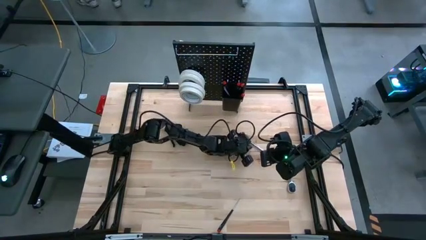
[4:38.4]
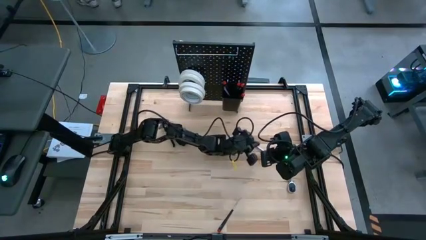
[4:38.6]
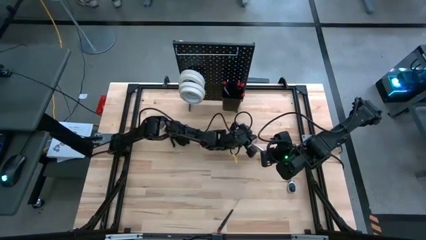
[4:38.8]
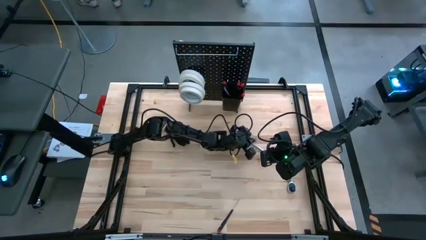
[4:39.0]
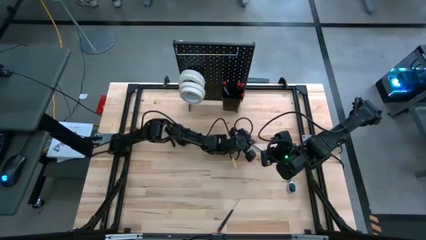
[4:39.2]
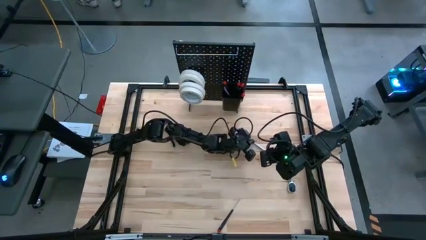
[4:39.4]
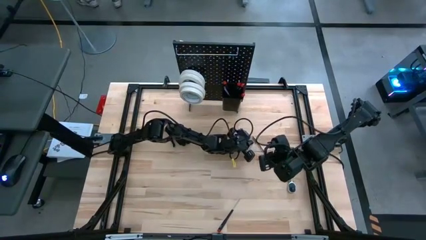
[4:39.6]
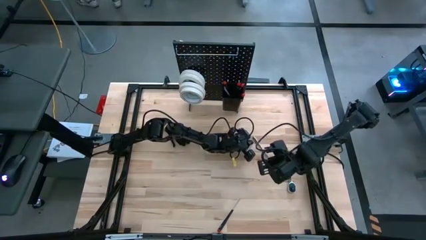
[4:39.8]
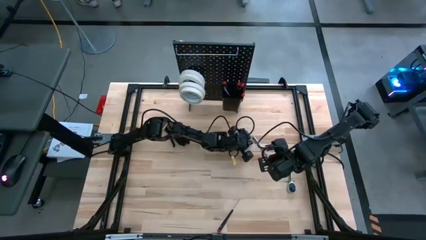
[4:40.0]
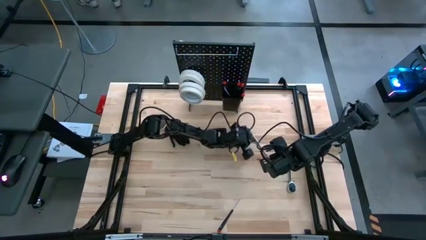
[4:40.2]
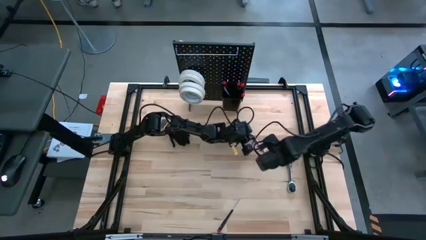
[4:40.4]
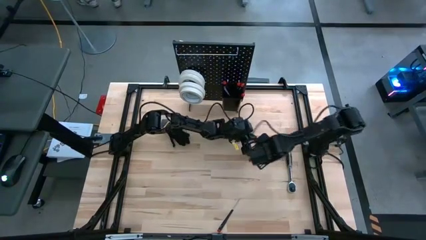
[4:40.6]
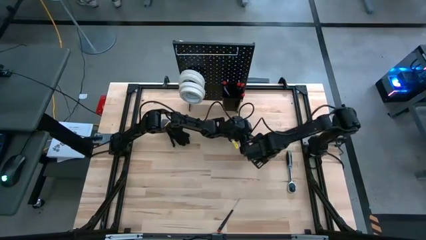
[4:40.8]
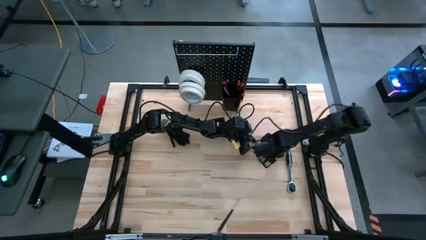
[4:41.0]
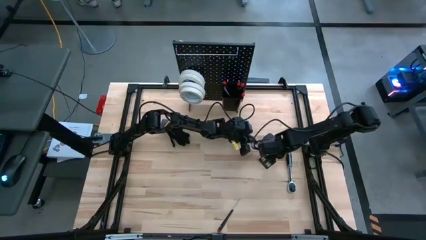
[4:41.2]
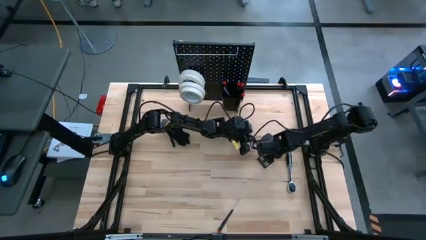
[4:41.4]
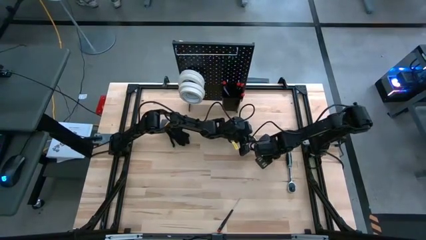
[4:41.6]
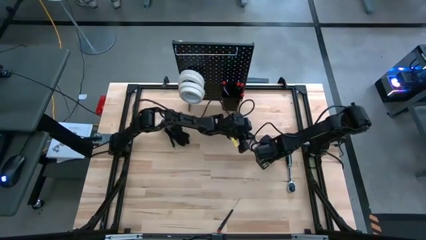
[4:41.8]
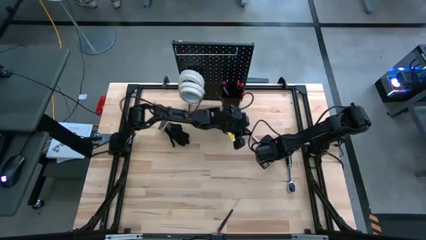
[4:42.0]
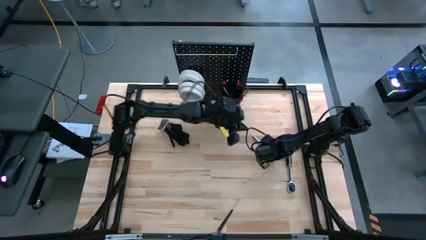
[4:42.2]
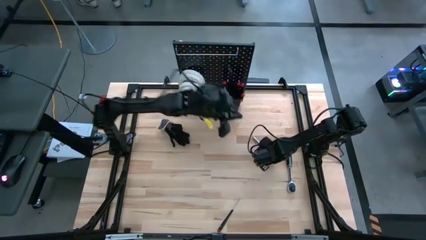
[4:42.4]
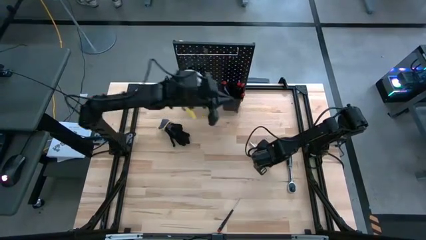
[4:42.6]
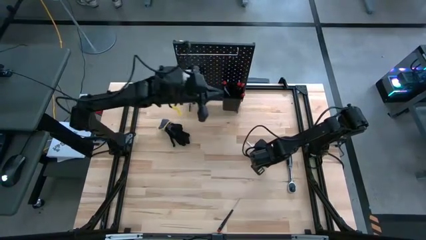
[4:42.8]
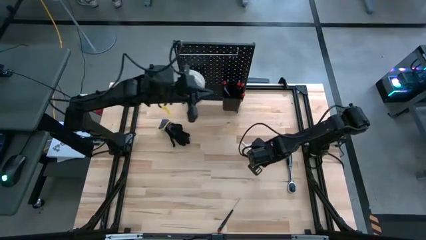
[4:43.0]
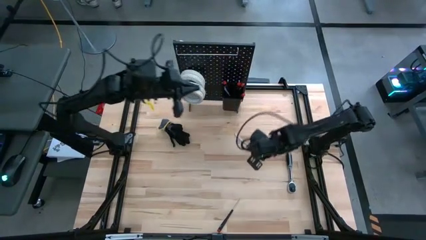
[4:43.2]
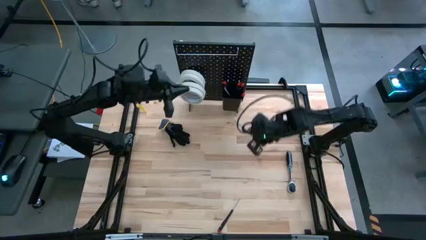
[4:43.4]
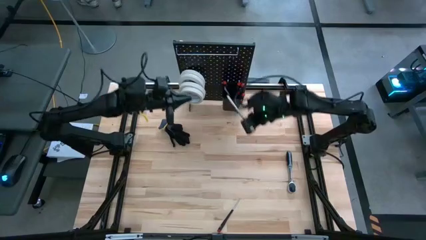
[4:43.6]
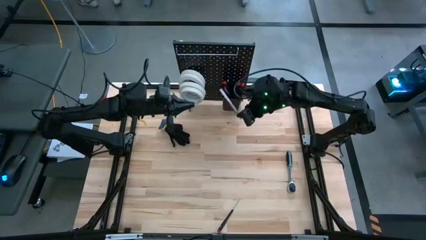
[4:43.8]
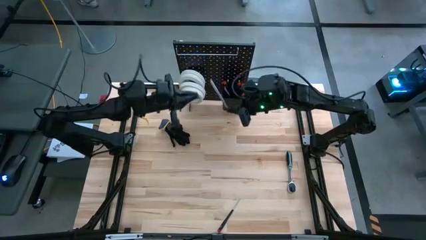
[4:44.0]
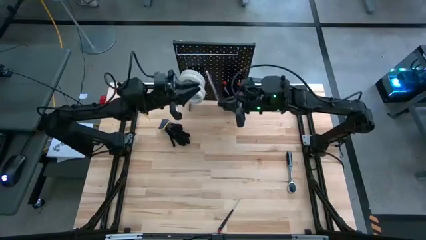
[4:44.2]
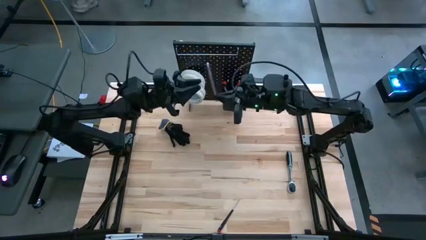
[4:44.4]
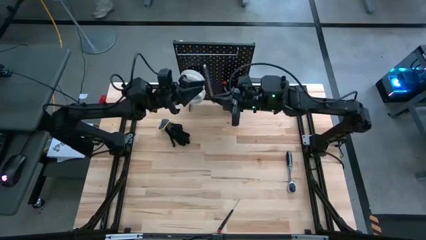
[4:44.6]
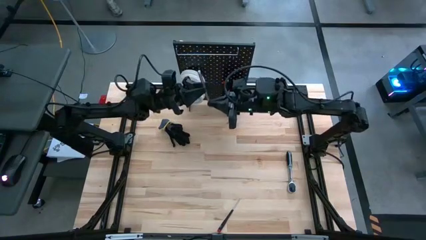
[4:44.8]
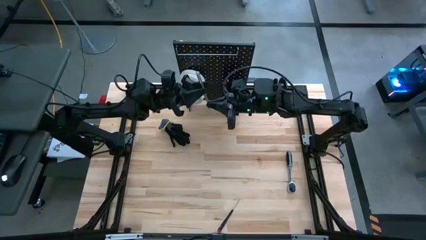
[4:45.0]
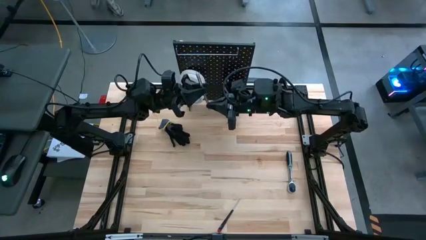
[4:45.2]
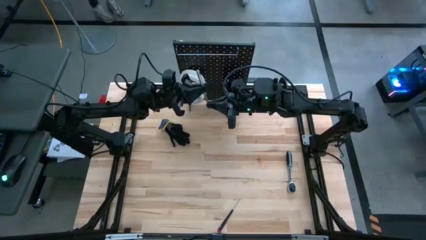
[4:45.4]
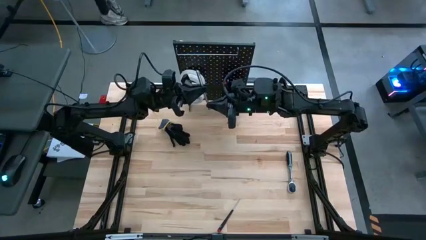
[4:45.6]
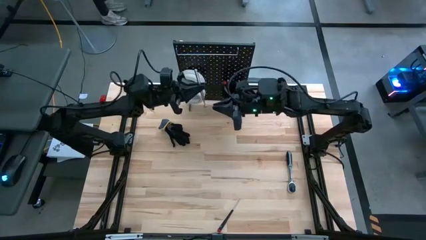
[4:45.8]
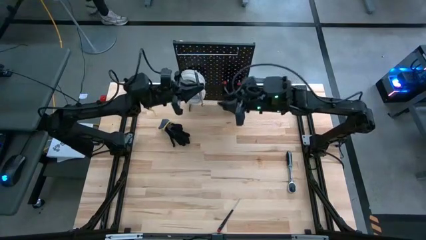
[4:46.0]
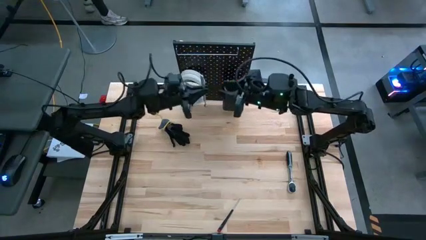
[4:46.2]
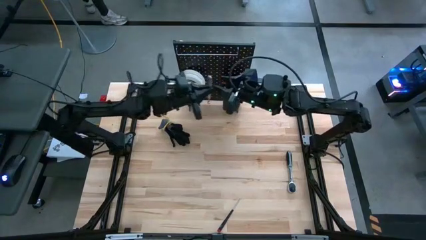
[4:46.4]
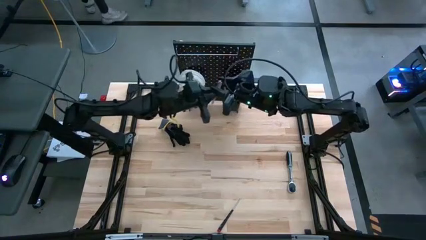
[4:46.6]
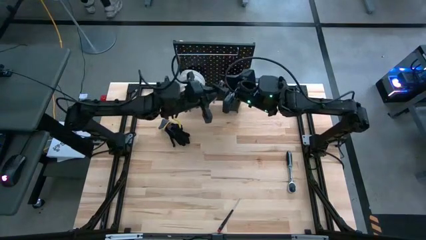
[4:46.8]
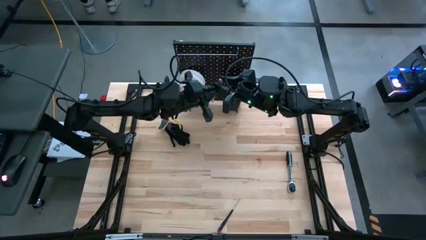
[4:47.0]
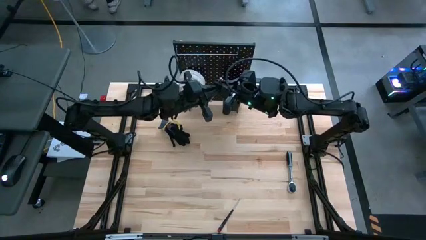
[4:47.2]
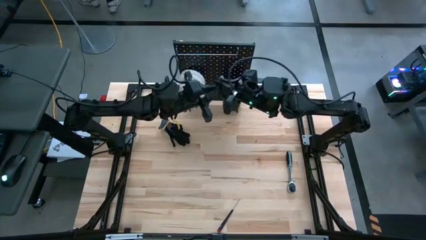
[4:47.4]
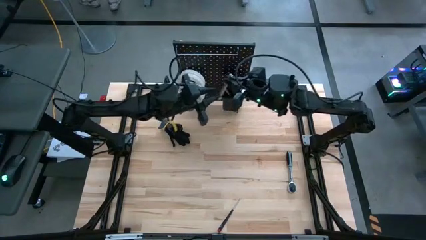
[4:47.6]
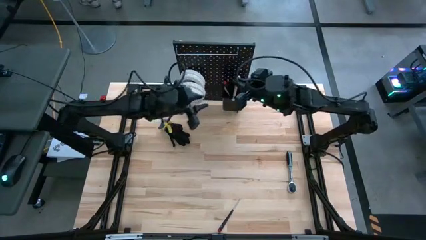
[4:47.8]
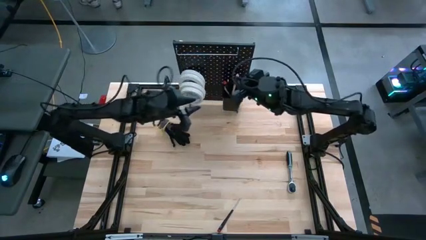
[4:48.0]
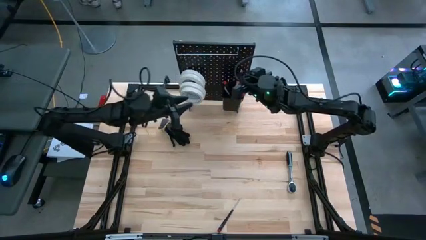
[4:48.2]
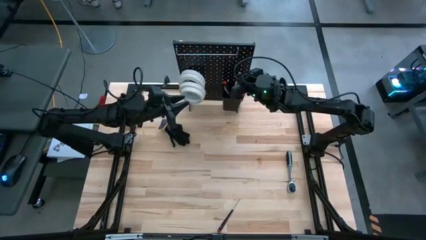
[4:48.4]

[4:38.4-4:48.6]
Task: Hang tools onto peg board
Put the silver magnetic telescoping into the black bin on the peg board

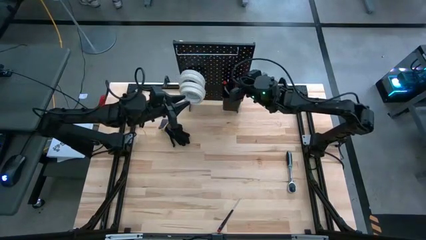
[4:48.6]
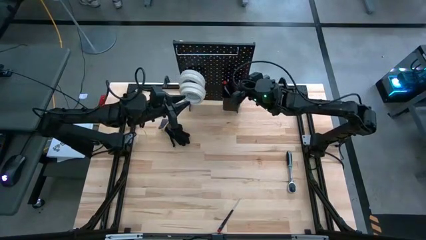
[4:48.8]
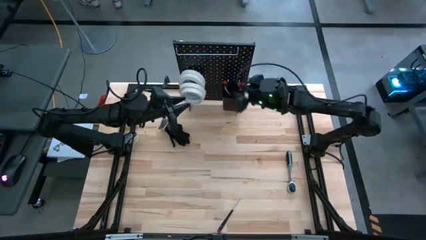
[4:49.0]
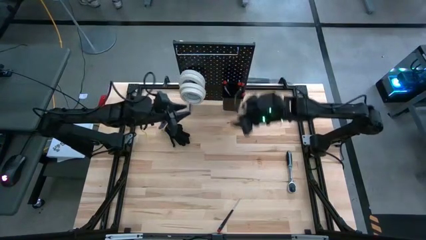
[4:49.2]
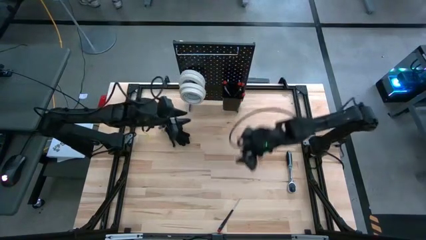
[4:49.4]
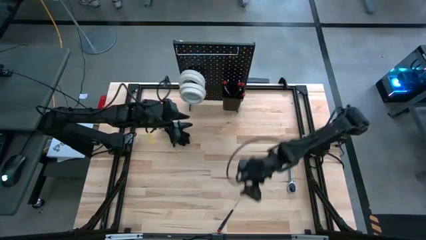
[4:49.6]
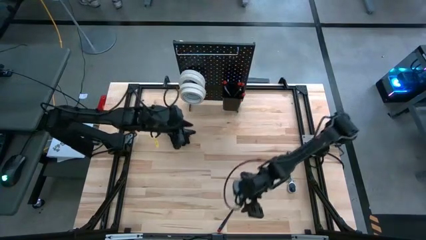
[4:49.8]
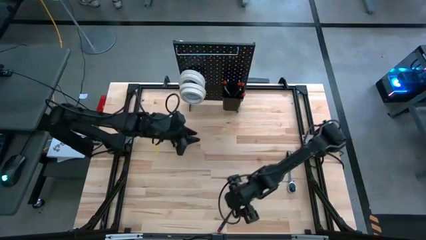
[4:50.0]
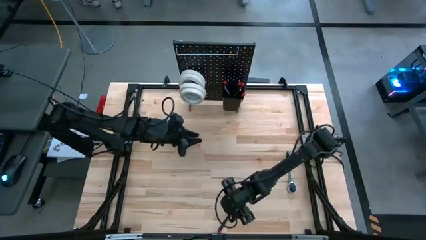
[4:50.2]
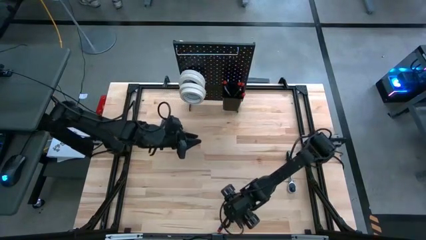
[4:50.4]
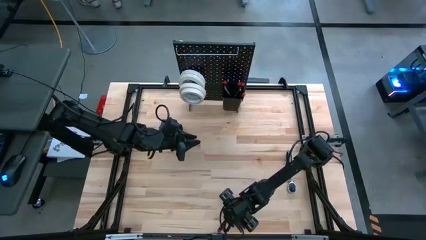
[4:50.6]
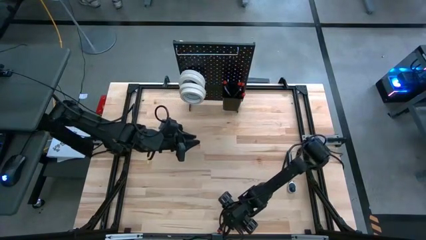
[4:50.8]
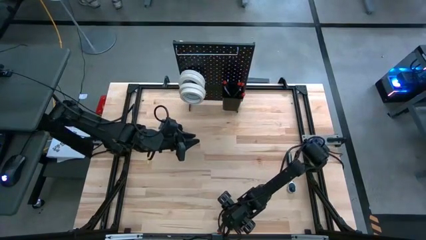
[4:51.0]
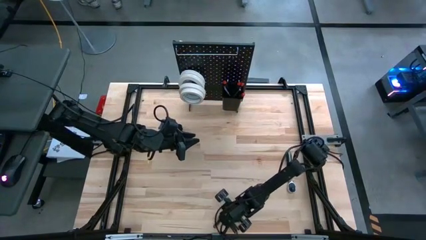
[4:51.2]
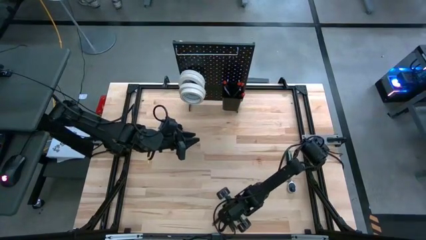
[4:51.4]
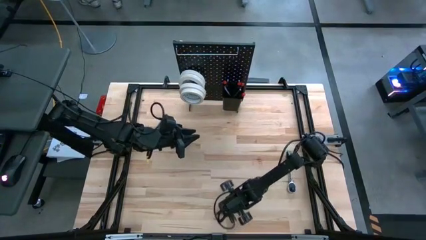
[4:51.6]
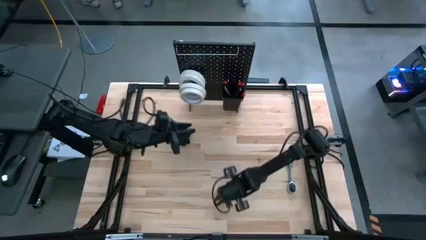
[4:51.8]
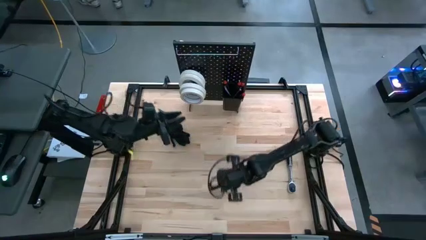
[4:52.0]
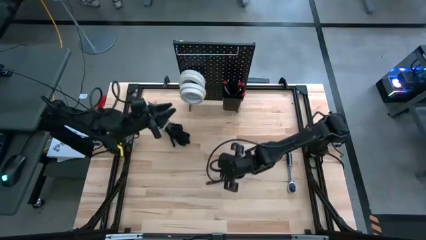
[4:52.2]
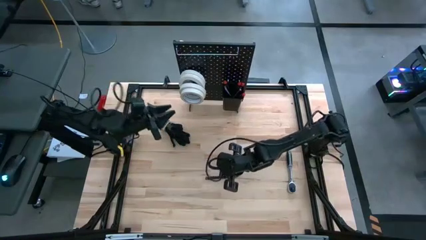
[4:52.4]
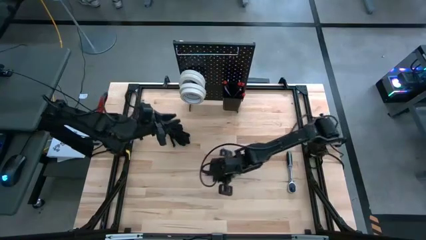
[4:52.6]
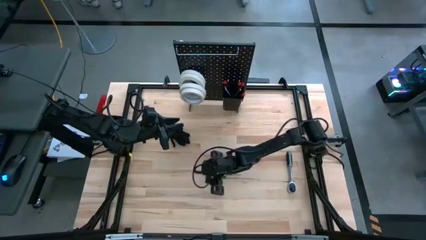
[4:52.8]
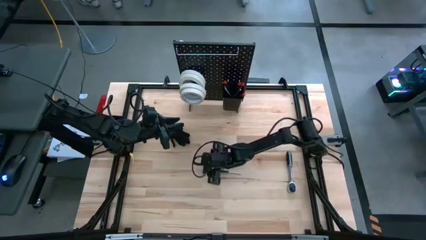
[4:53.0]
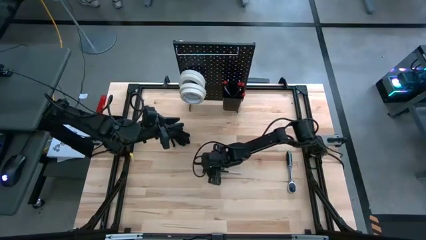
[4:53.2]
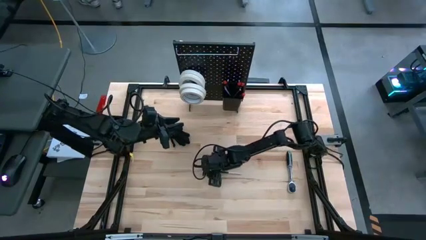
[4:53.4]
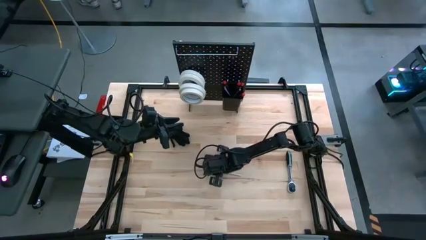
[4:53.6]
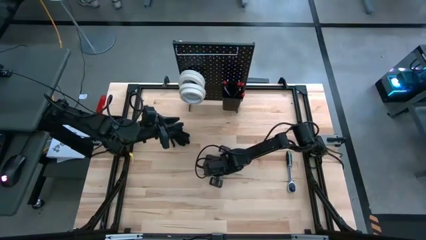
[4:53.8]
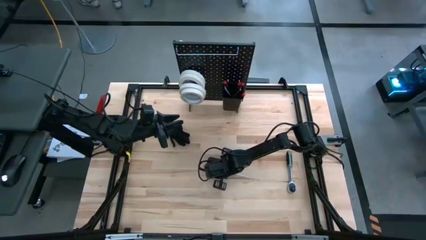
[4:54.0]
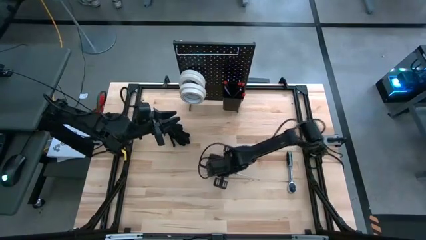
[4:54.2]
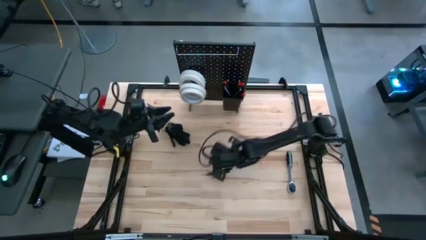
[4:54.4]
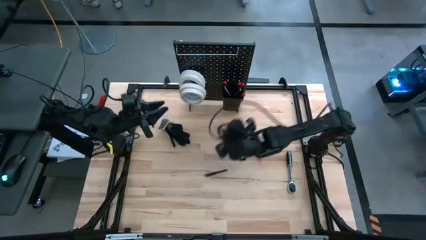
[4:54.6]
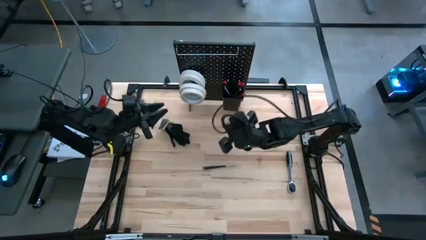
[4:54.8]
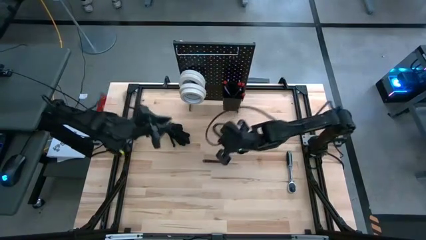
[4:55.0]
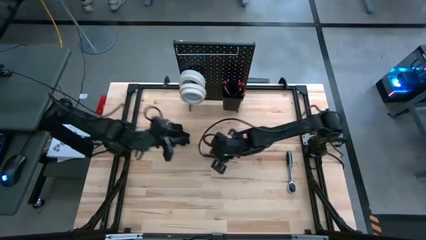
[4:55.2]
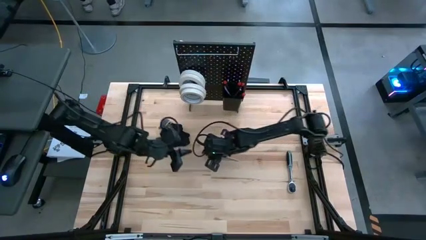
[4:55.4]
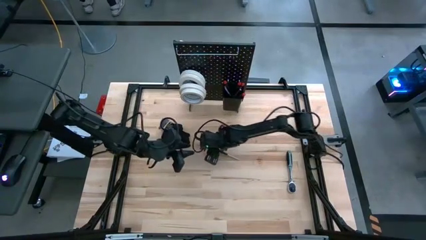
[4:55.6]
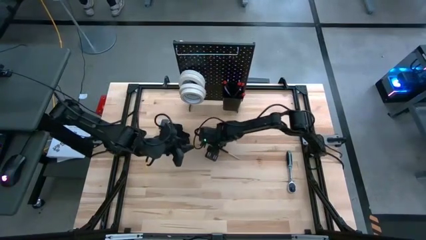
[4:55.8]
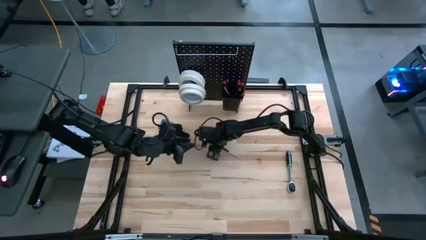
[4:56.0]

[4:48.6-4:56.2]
Put the black nut driver into the black bin on the peg board
